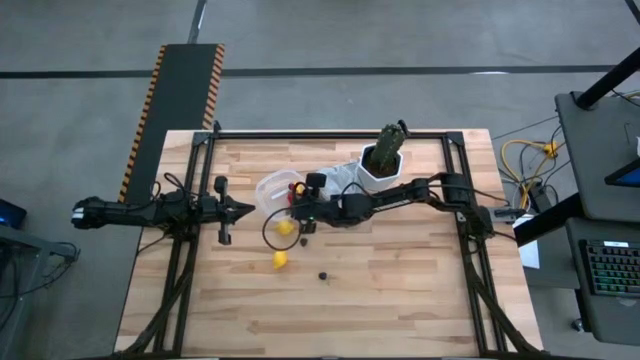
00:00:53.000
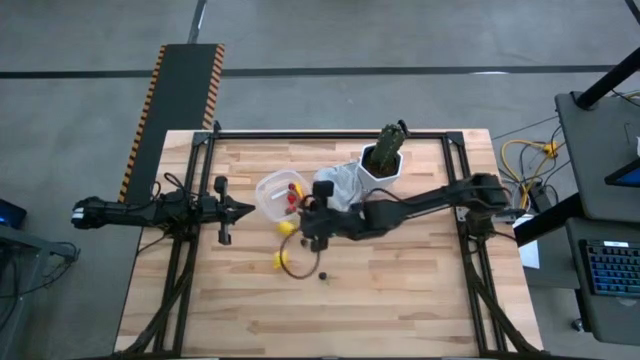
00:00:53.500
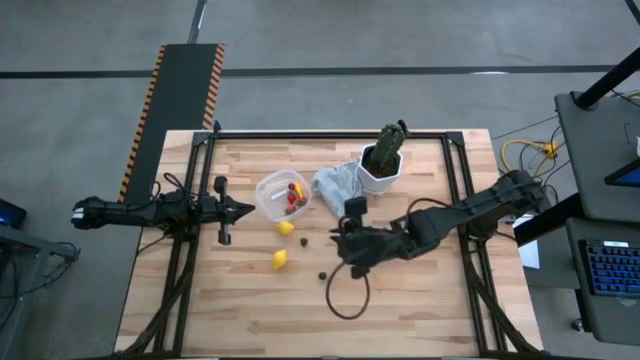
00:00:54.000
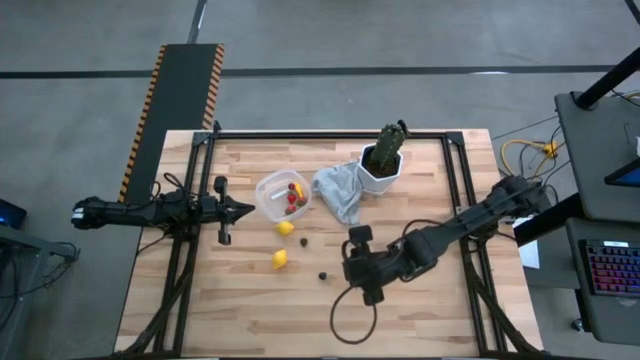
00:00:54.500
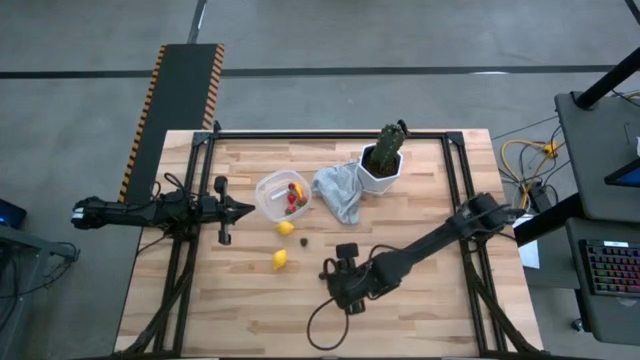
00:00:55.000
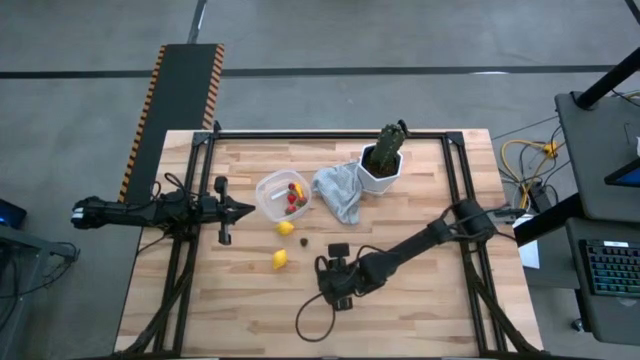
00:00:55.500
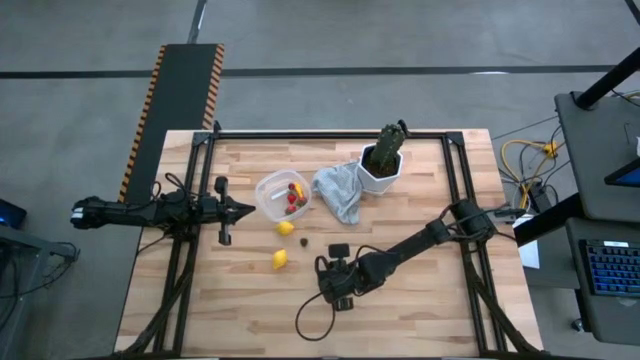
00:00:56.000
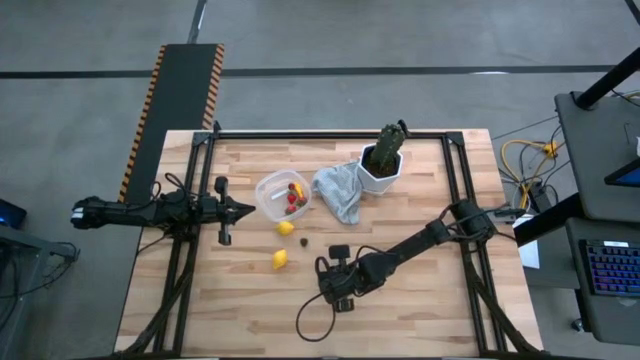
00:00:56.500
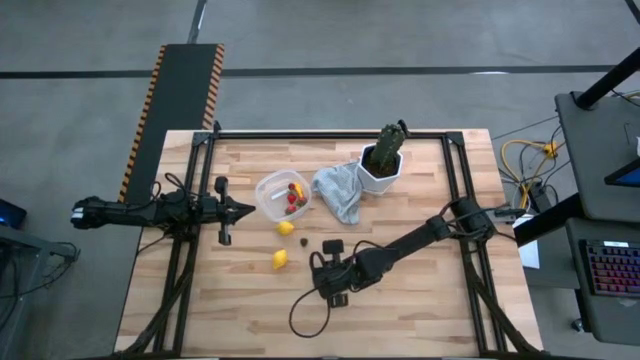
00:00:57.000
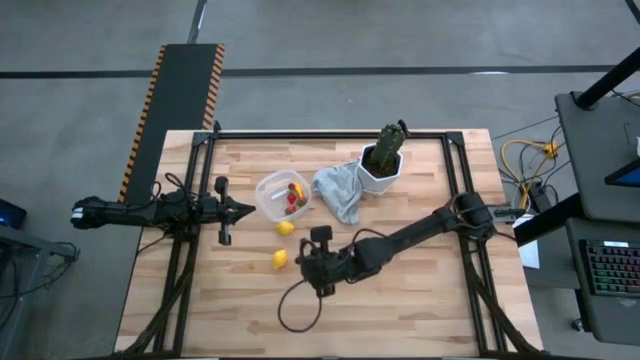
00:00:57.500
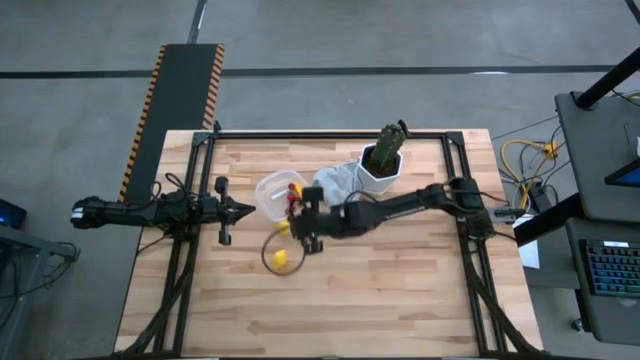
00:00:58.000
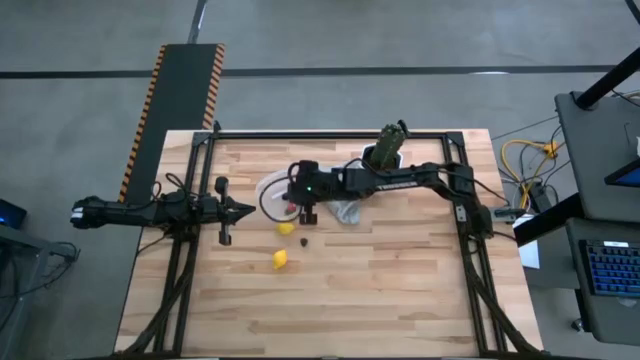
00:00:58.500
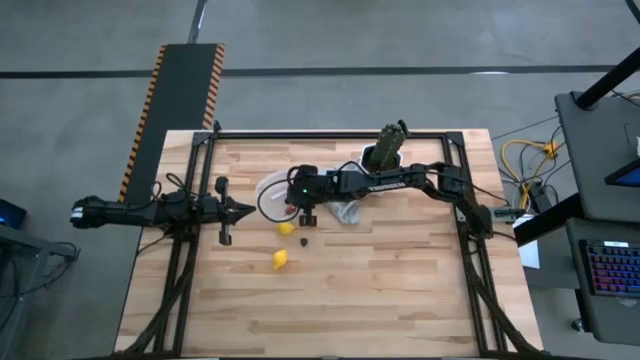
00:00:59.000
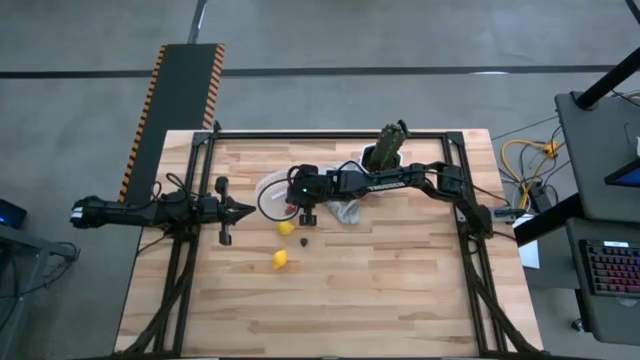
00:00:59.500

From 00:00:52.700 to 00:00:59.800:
Task: Pick and placing Produce into tupperware
Put the black cherry into the transparent container

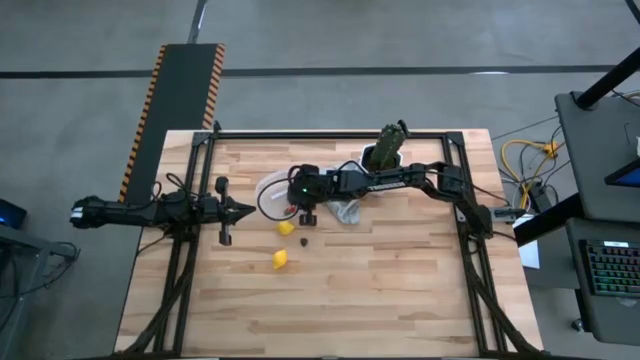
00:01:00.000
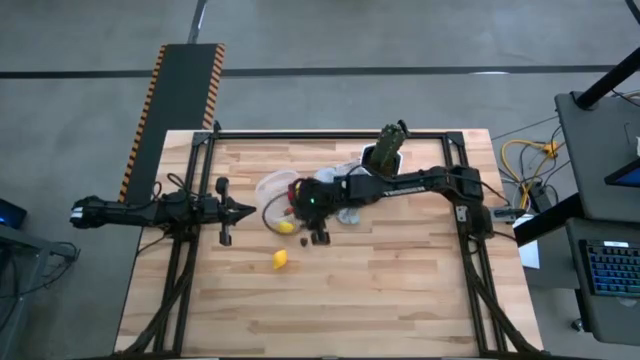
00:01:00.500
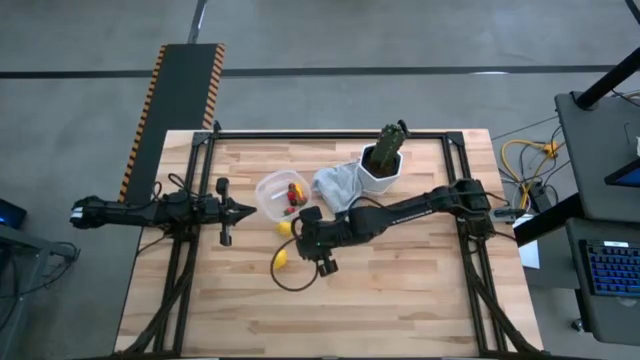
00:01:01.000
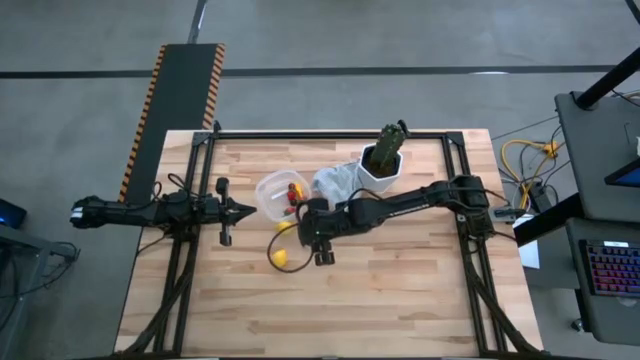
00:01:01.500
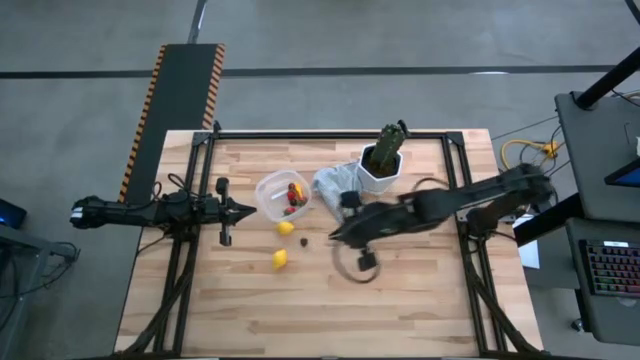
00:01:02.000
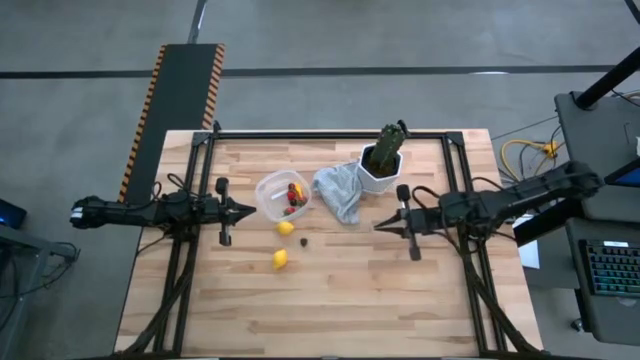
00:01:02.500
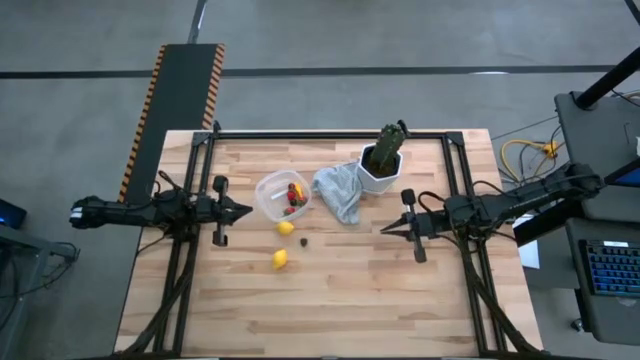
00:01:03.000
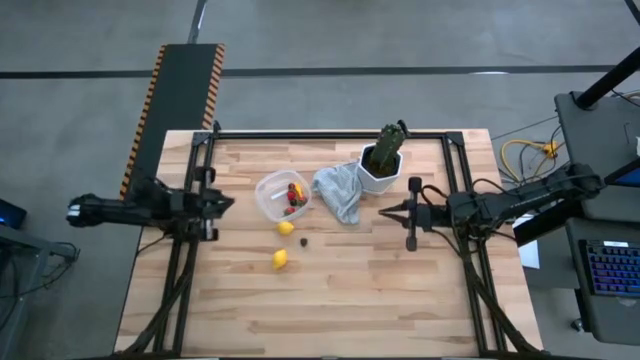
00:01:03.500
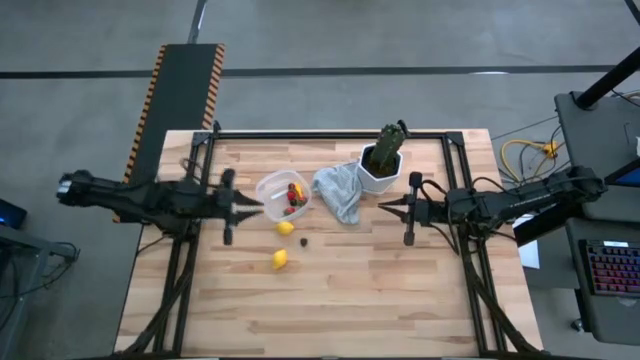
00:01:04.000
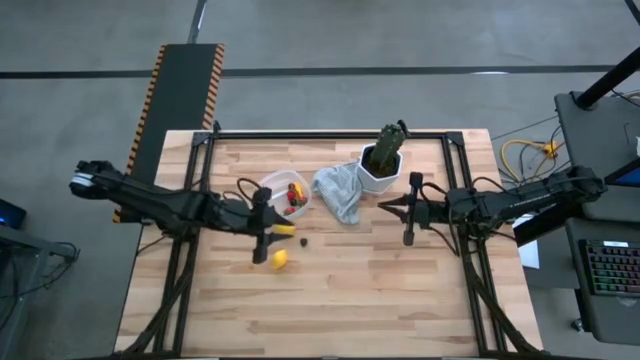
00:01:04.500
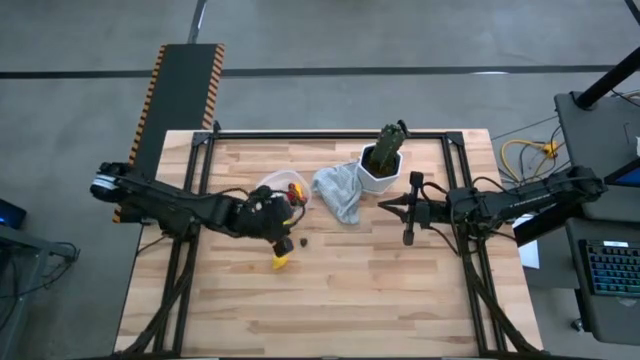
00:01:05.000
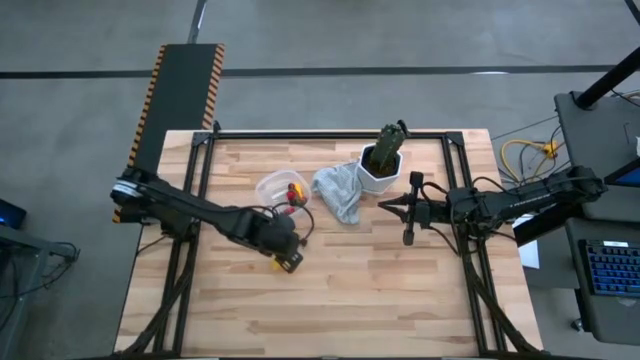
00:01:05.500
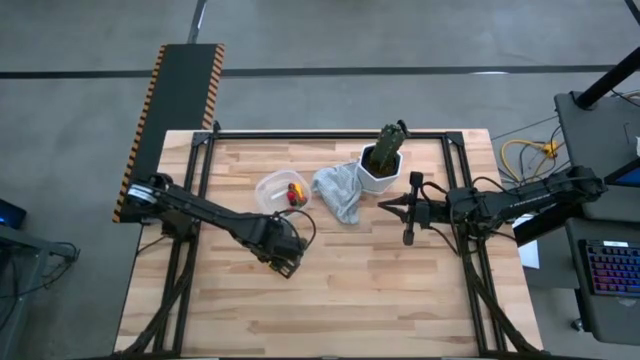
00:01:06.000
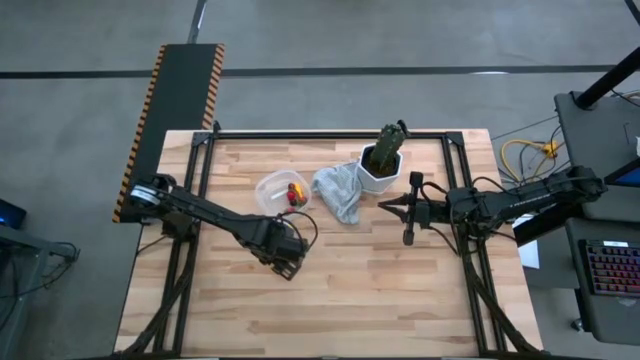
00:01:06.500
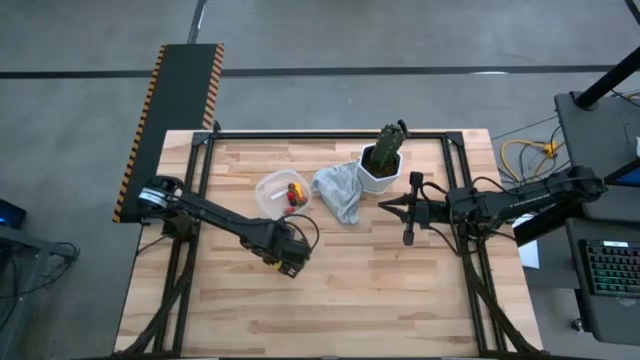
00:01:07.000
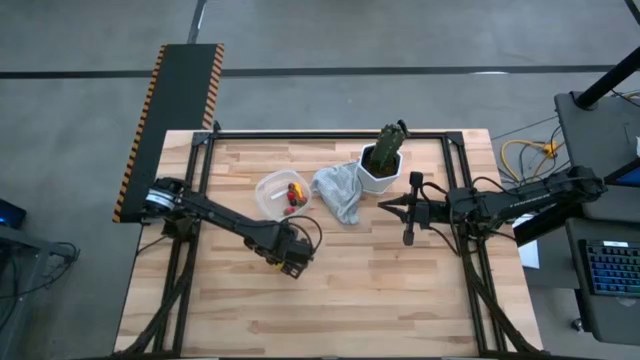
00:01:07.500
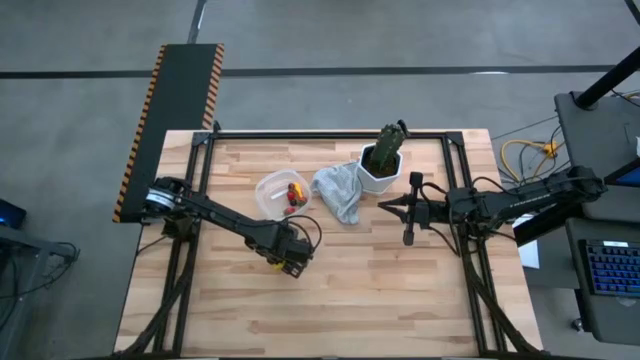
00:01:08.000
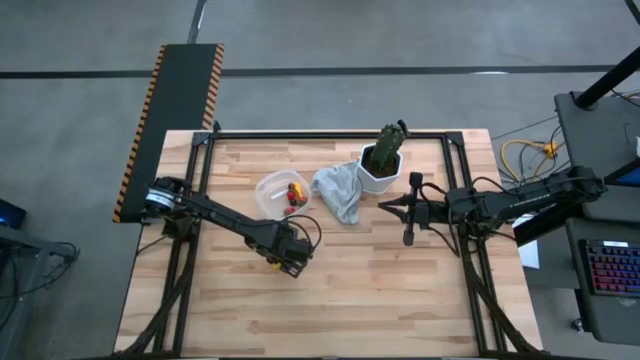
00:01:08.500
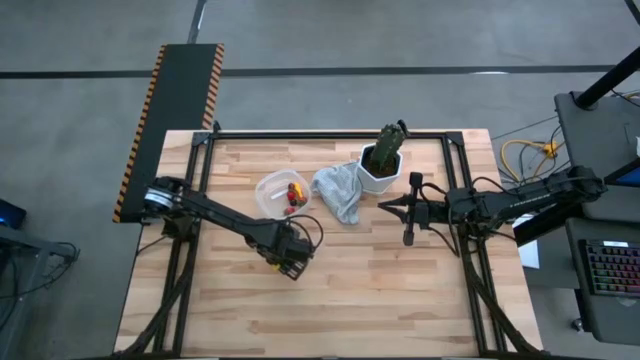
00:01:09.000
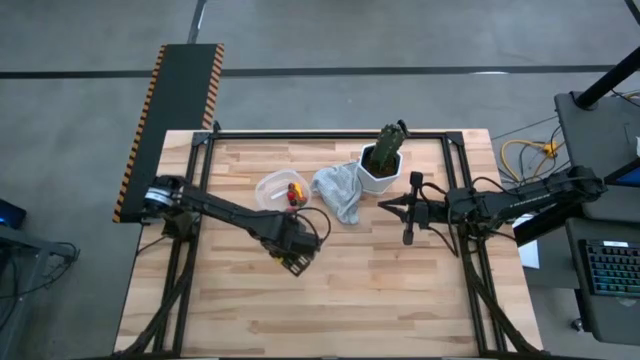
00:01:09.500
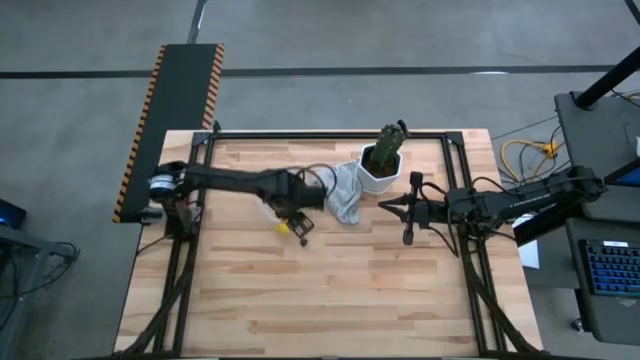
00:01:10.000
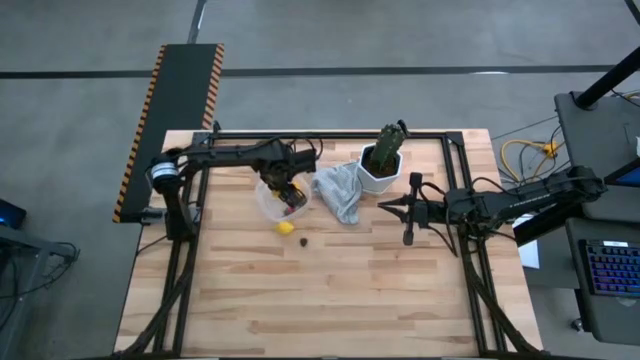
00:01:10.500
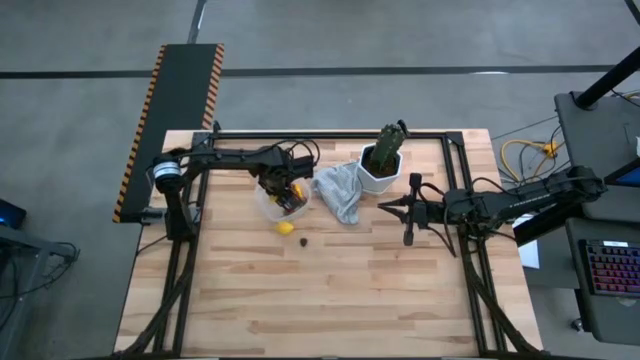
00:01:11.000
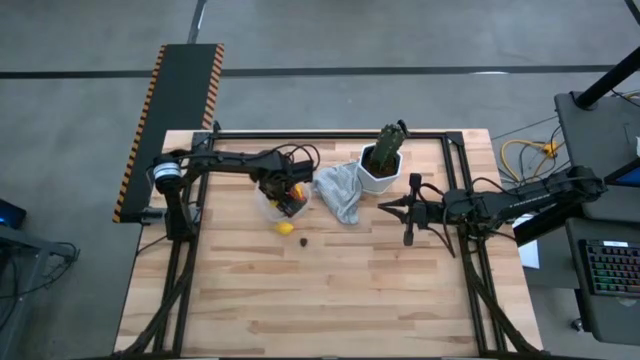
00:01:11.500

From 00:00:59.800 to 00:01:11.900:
Put the bottom yellow lemon into the transparent container

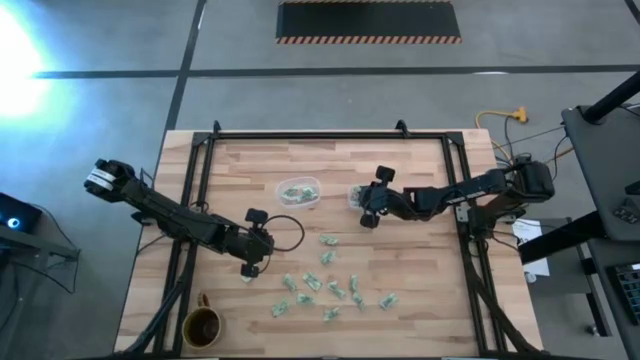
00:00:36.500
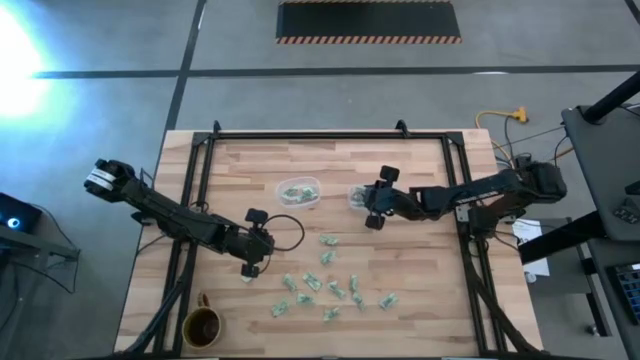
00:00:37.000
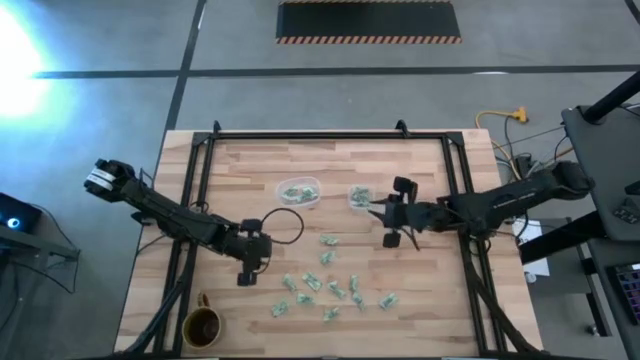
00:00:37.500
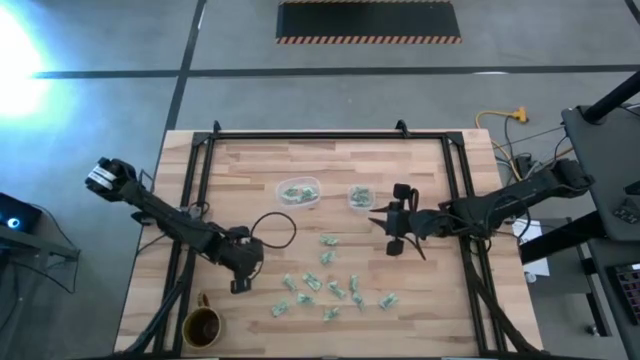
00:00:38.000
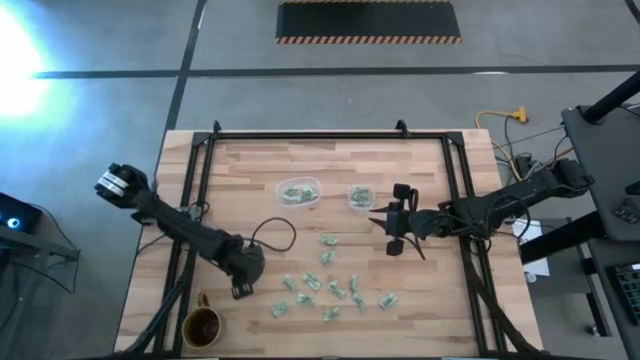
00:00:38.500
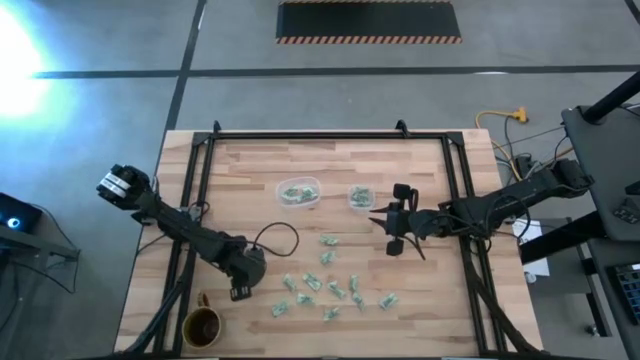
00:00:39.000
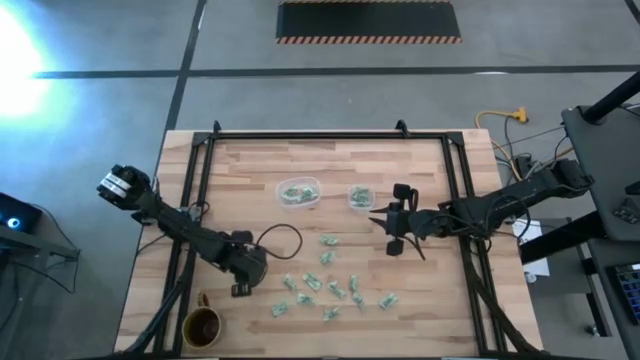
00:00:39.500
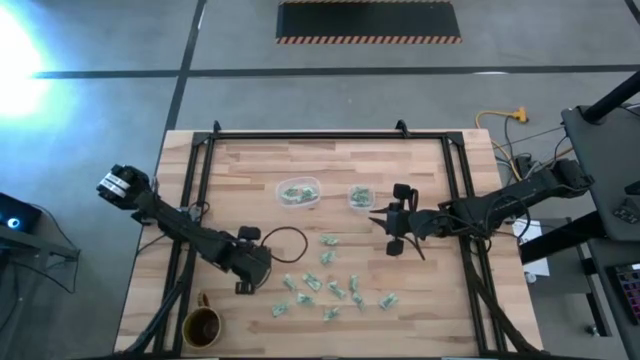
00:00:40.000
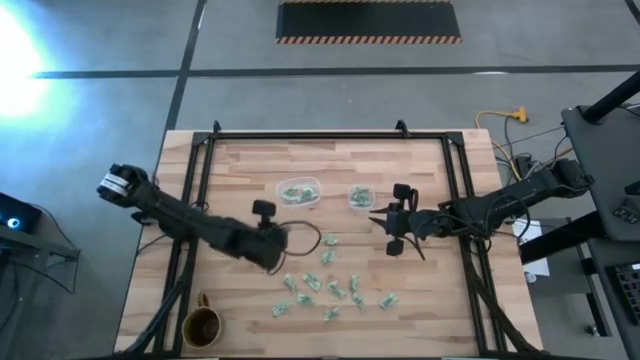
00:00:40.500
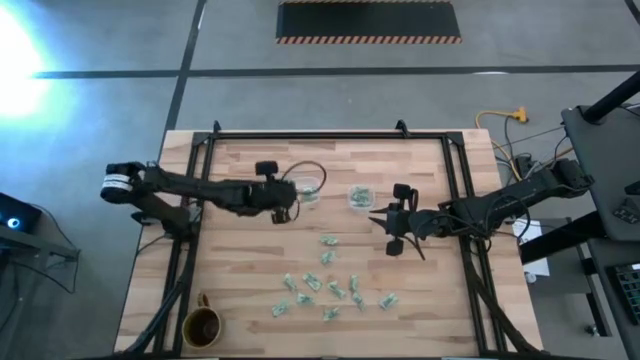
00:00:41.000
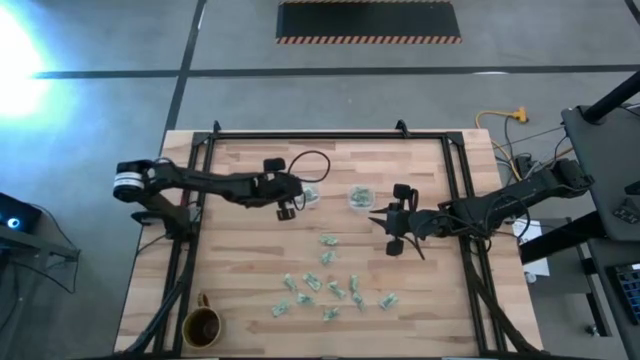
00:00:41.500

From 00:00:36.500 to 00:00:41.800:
Task: Pick and place Stevia / Truvia into bins
Put the stevia packet into the transparent oval container
